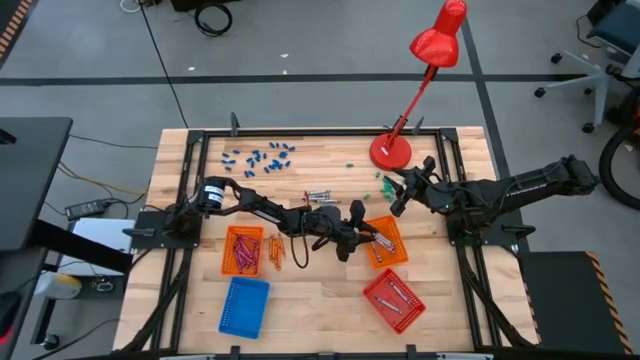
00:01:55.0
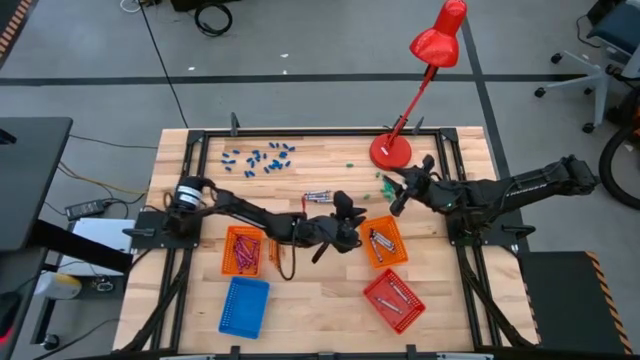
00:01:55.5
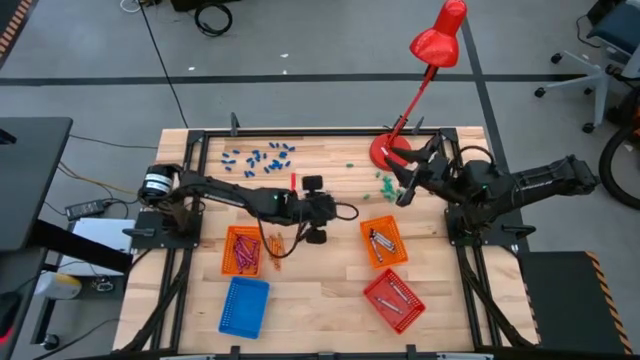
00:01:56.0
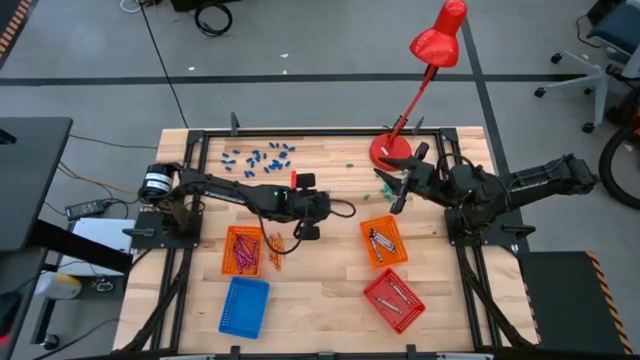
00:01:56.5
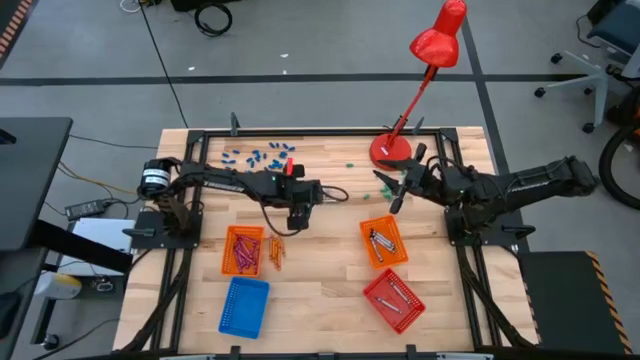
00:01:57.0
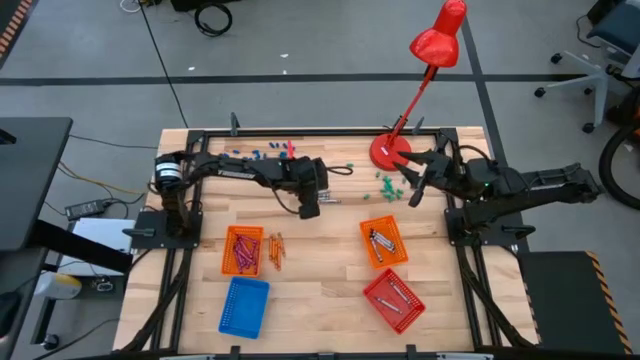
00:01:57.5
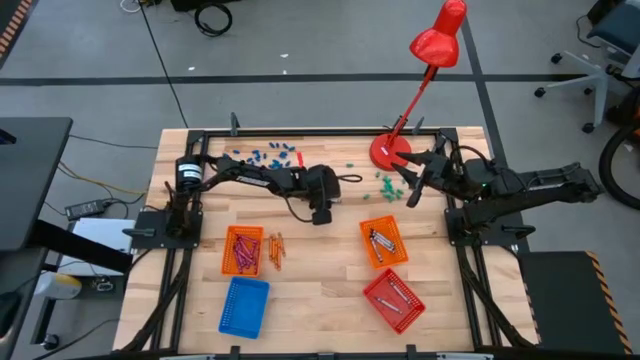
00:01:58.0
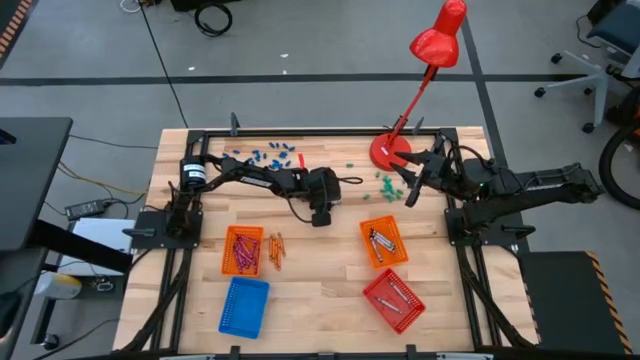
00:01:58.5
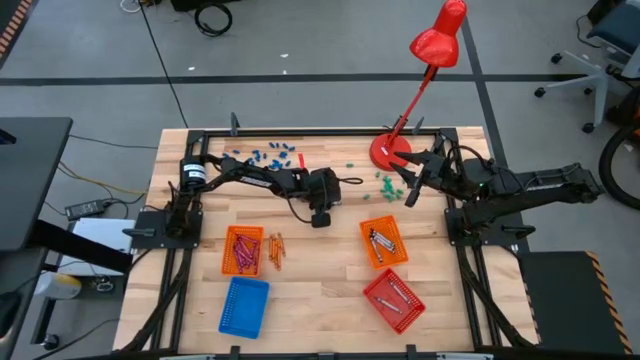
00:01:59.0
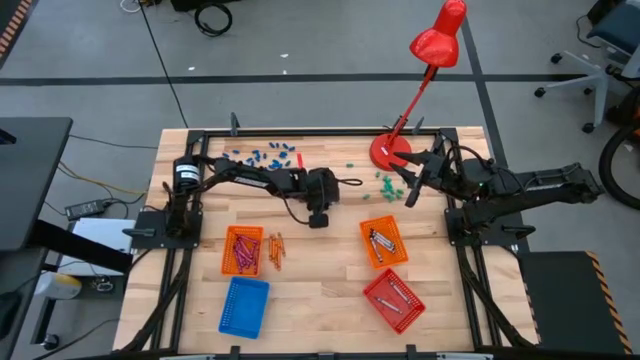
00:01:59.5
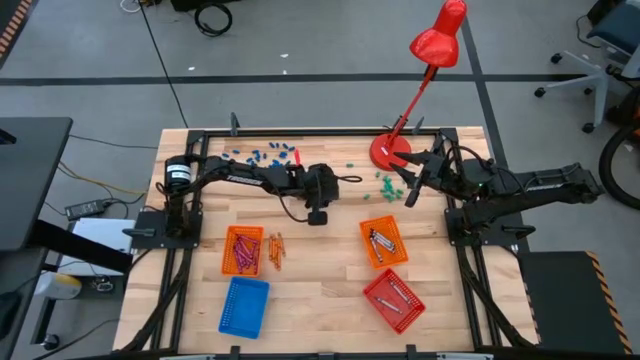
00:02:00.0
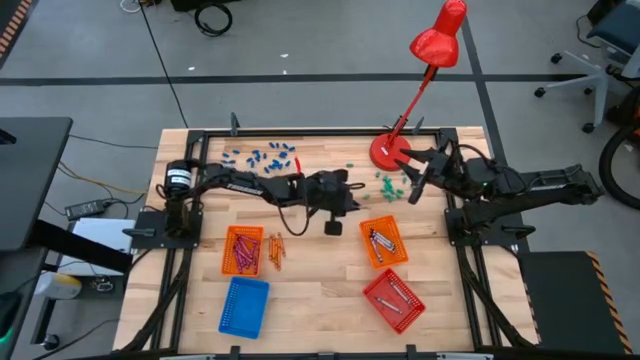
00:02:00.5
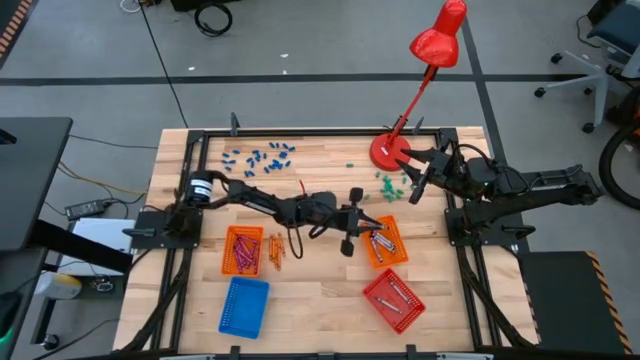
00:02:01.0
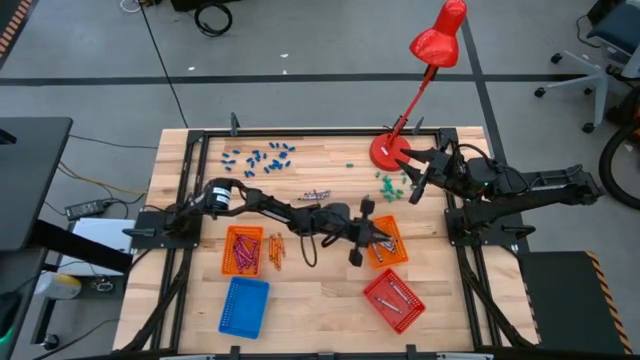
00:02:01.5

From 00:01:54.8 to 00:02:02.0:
Task: Sort crayons
Put the black crayon into the right orange bin

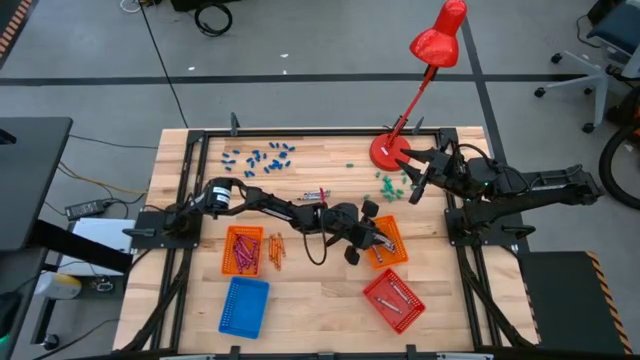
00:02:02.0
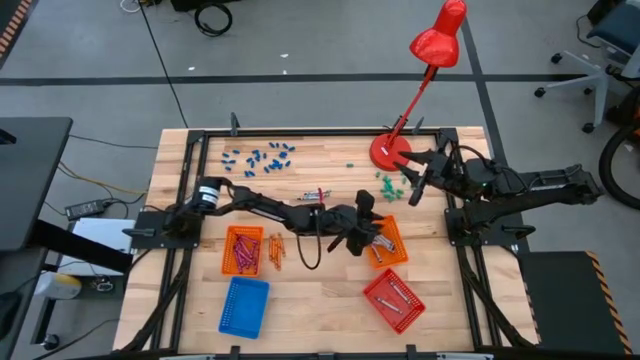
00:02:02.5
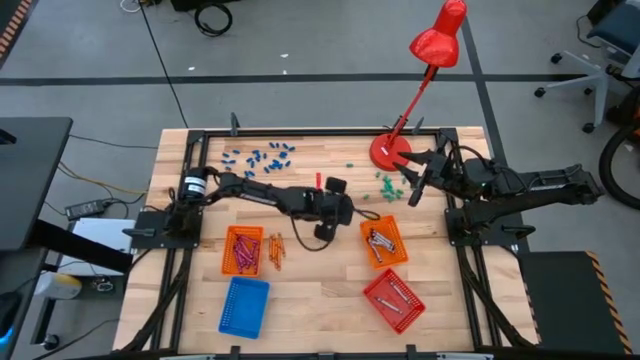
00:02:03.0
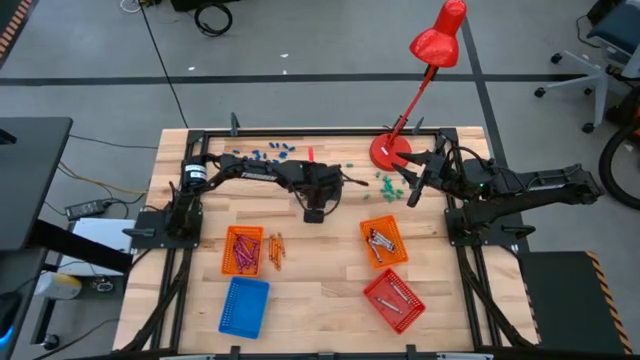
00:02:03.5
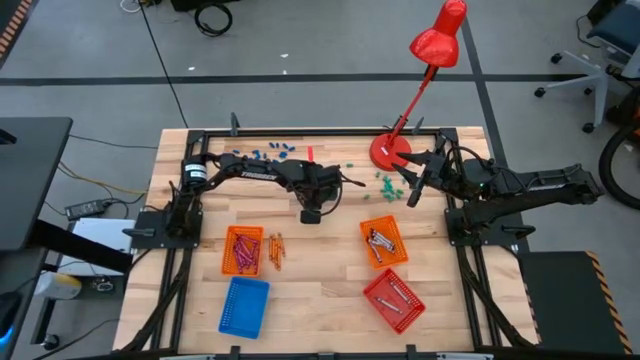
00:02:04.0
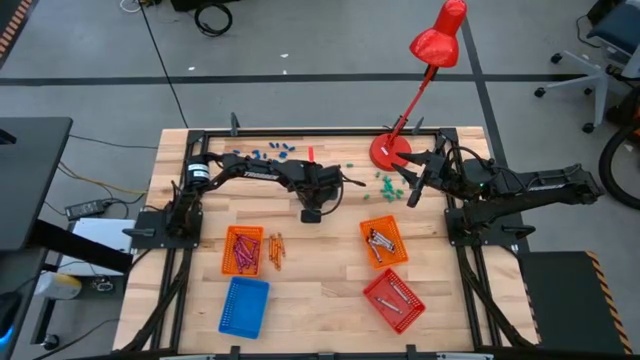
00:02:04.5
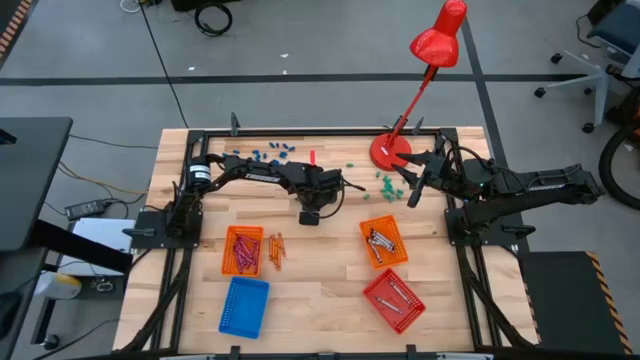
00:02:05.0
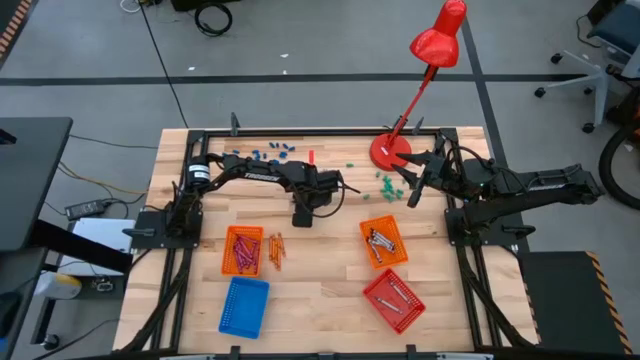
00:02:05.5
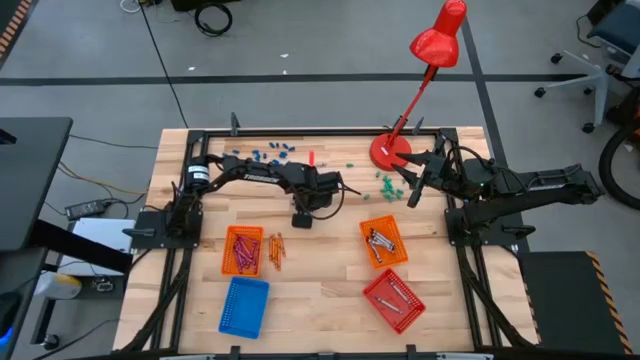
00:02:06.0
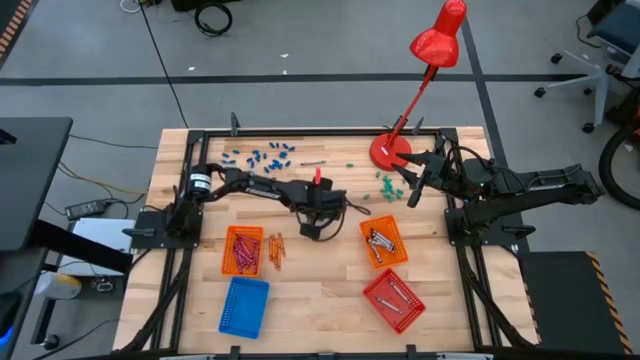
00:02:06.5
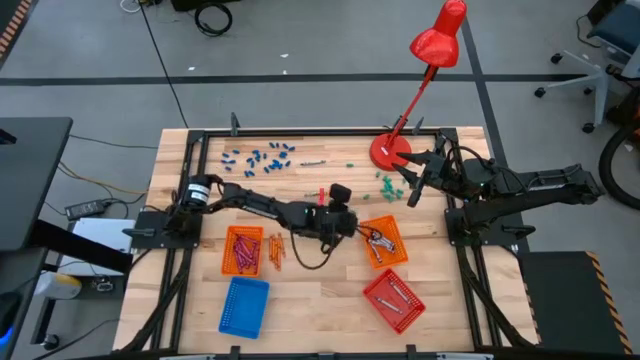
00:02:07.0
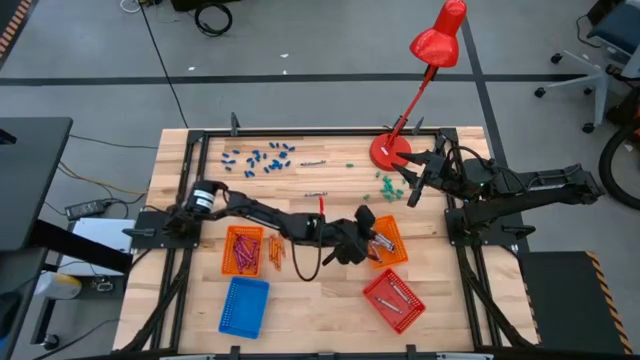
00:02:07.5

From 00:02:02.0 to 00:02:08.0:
Put the black crayon into the right orange bin

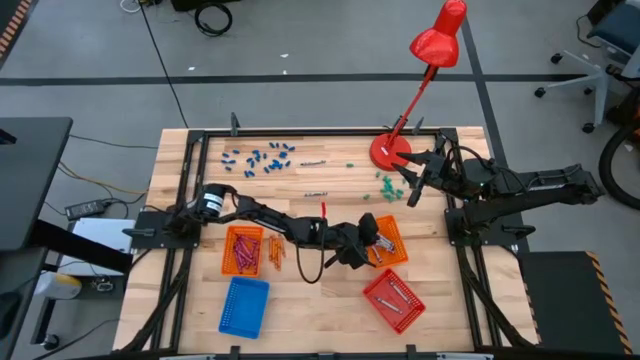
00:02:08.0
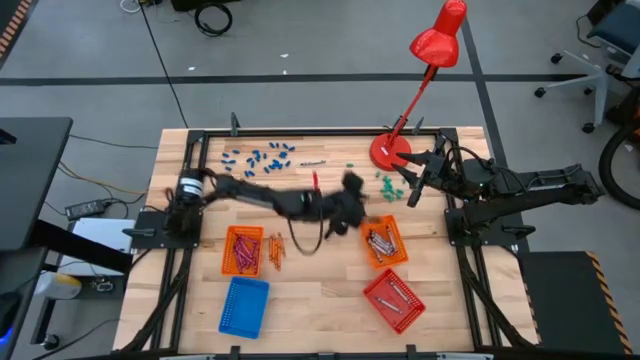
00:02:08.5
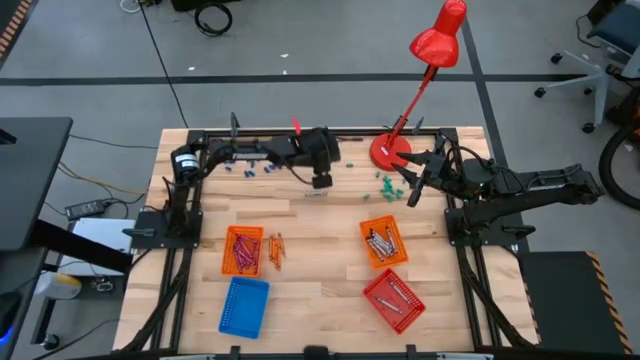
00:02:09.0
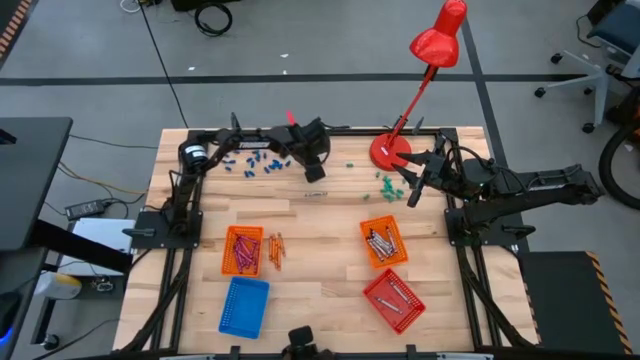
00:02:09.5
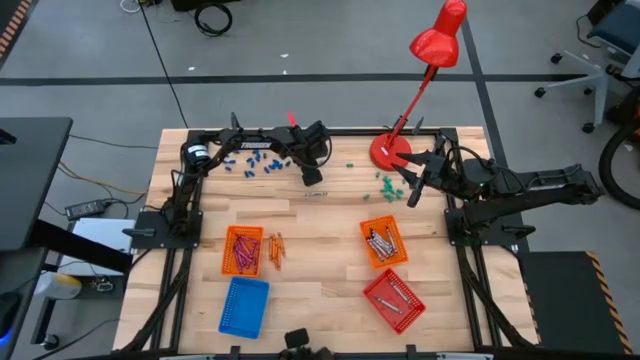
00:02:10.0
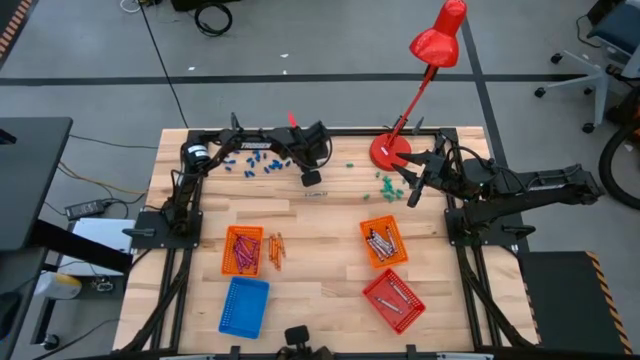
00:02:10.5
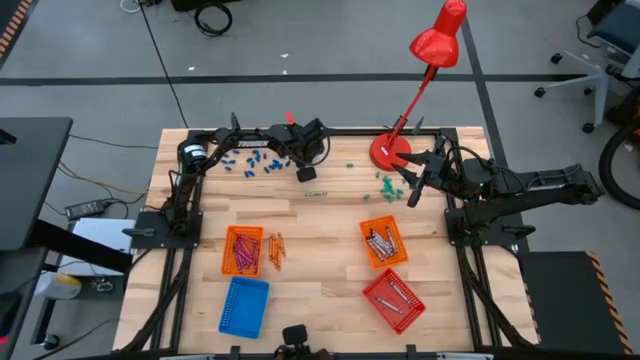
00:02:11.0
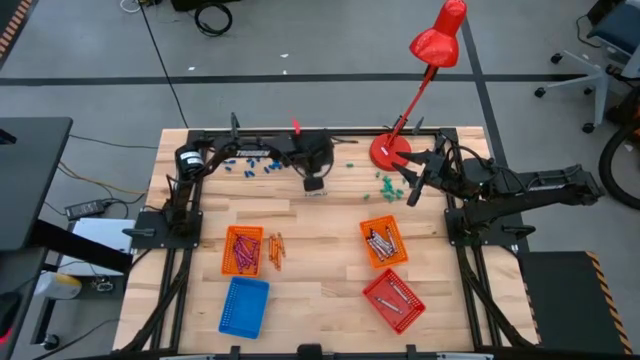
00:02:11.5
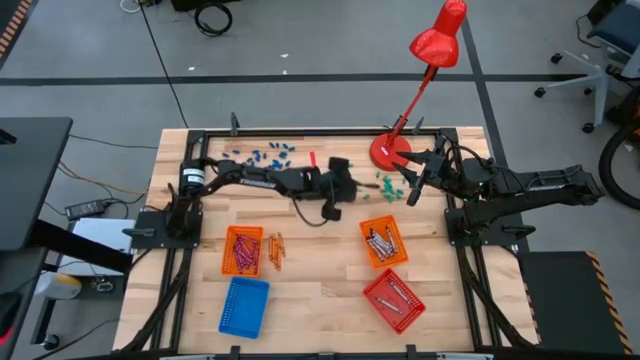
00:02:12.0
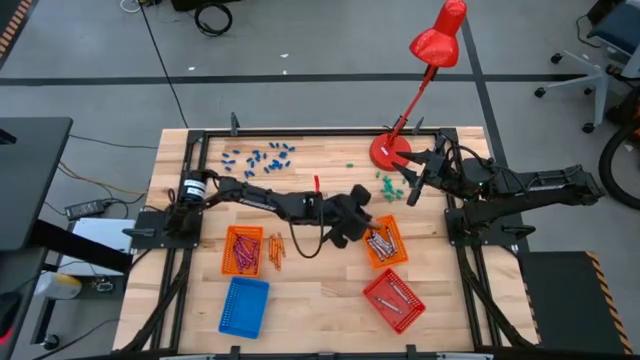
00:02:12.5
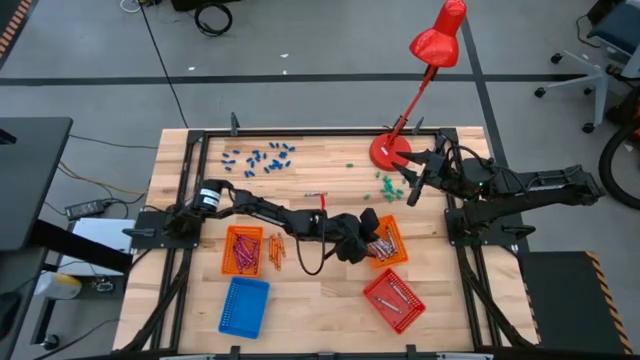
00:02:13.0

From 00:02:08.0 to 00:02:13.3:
Put the black crayon into the right orange bin

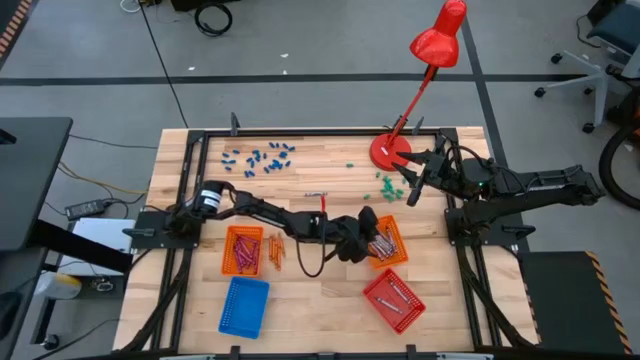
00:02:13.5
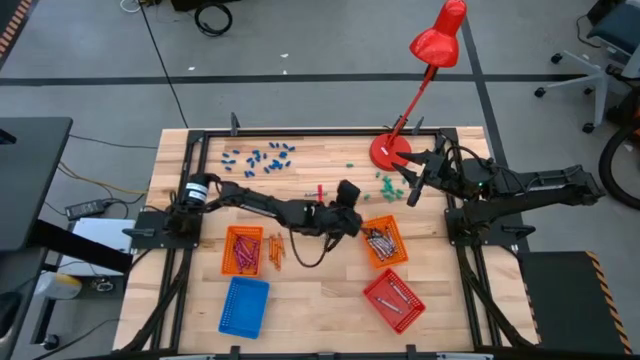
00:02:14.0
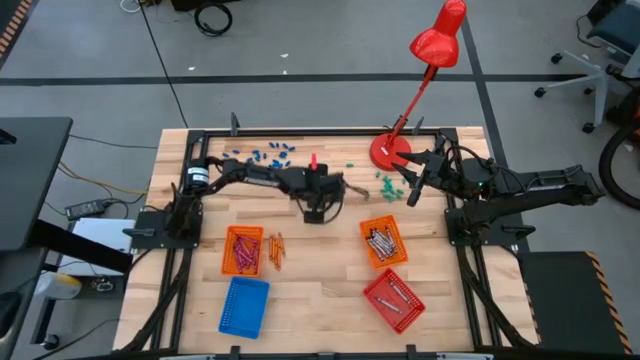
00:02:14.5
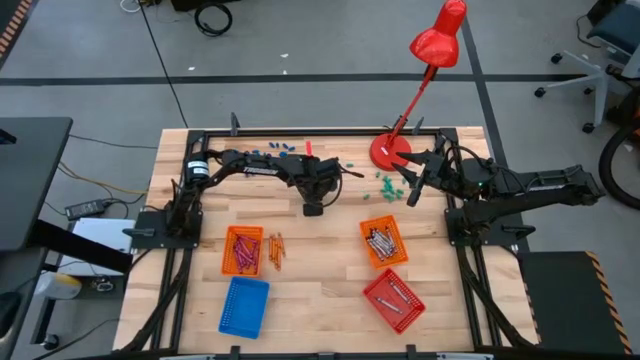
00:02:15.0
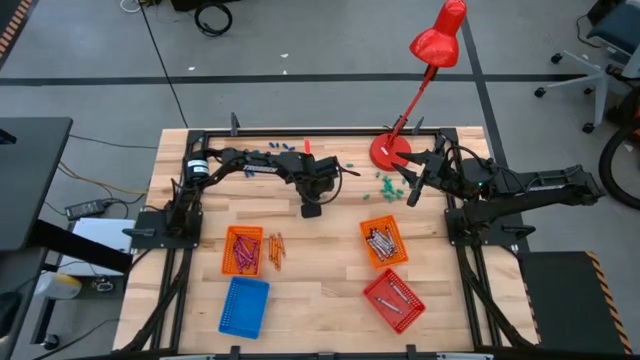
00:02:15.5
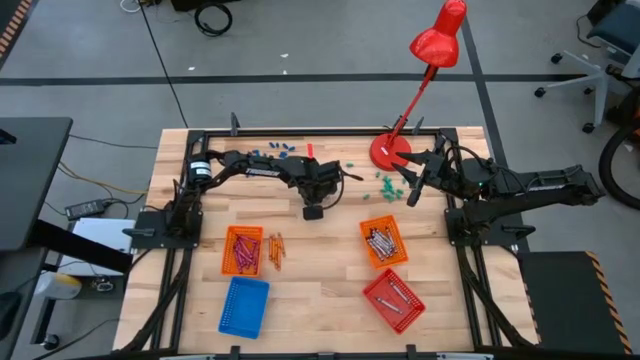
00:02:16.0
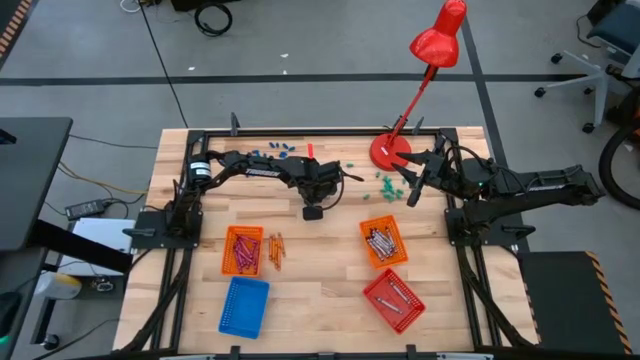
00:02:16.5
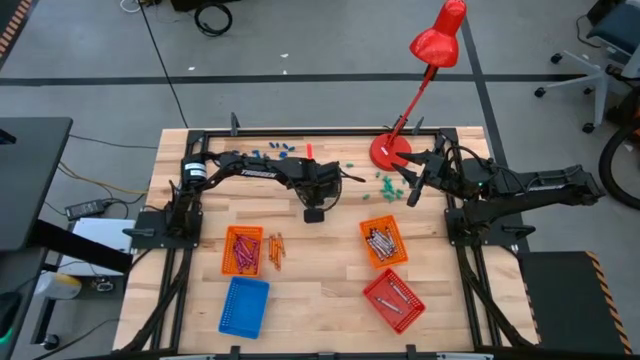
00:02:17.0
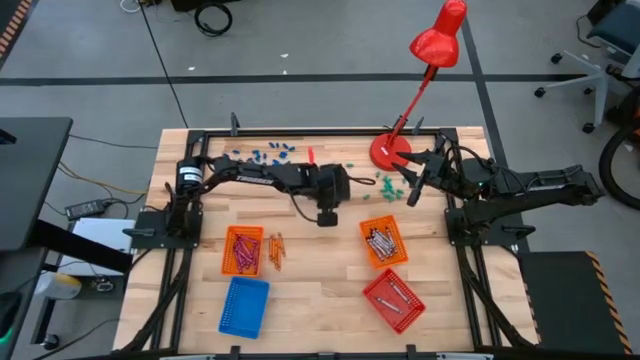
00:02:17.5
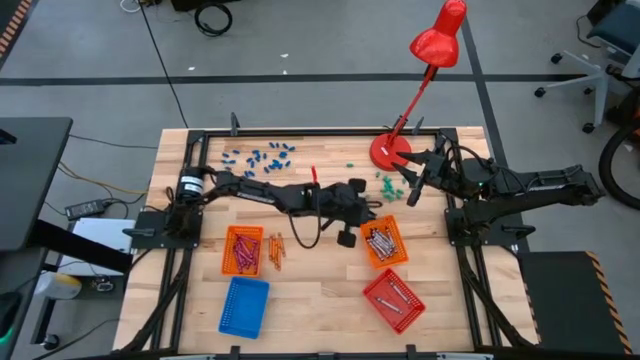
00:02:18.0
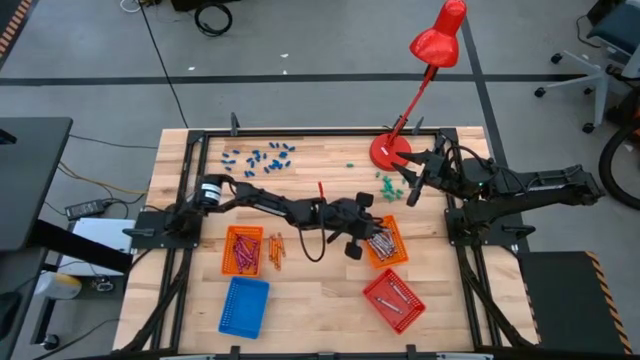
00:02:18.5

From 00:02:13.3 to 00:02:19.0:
Put the black crayon into the right orange bin
